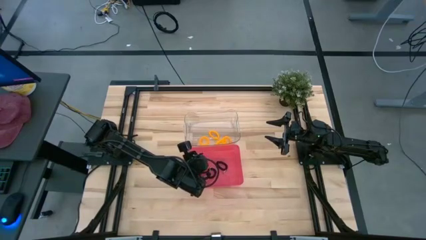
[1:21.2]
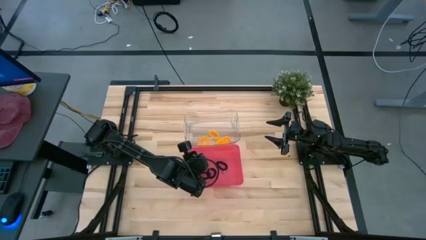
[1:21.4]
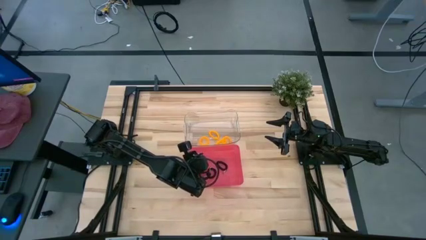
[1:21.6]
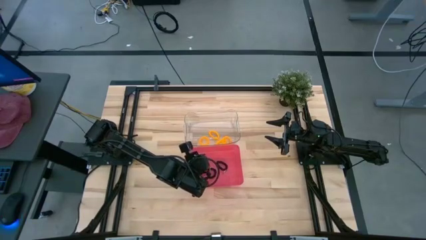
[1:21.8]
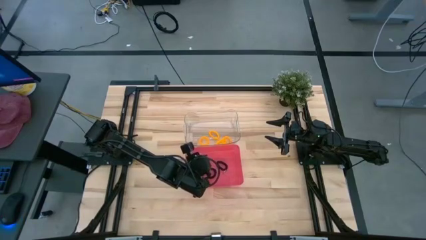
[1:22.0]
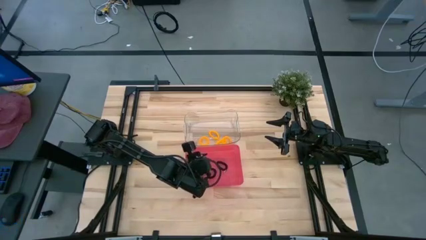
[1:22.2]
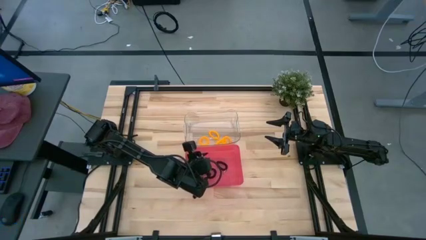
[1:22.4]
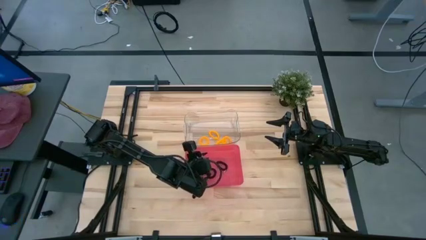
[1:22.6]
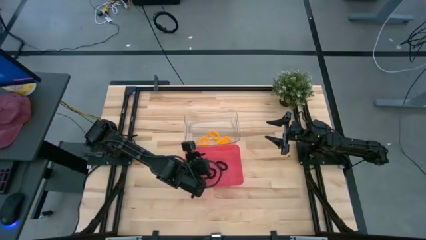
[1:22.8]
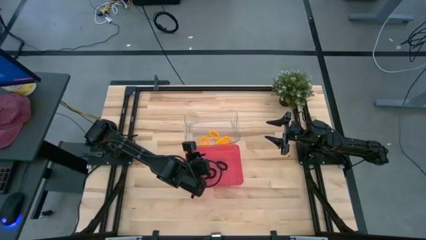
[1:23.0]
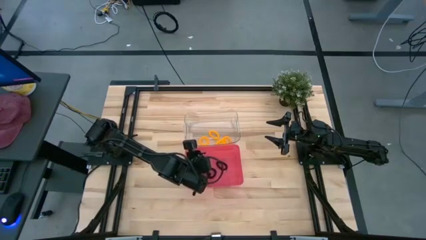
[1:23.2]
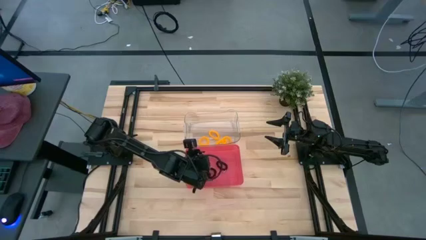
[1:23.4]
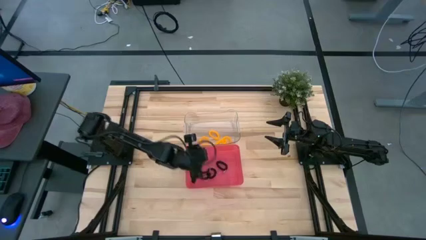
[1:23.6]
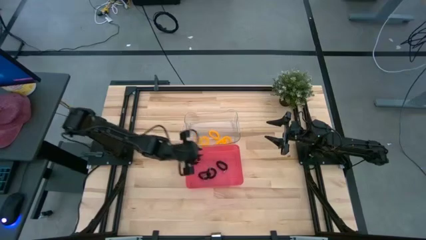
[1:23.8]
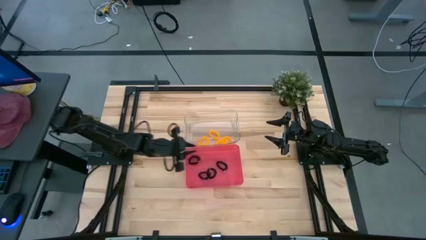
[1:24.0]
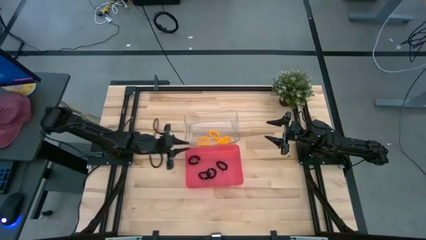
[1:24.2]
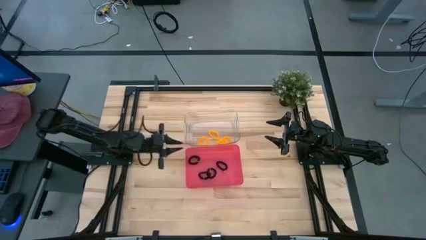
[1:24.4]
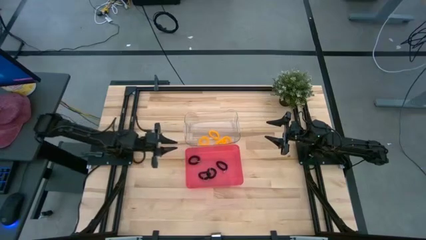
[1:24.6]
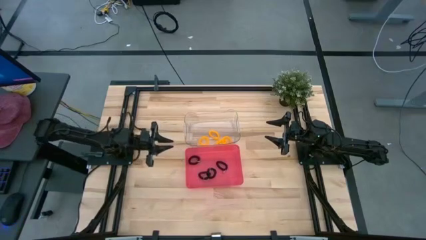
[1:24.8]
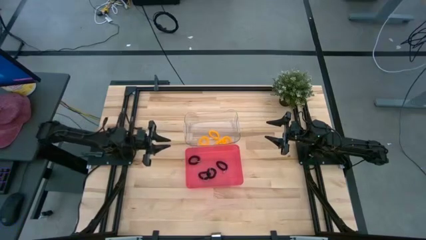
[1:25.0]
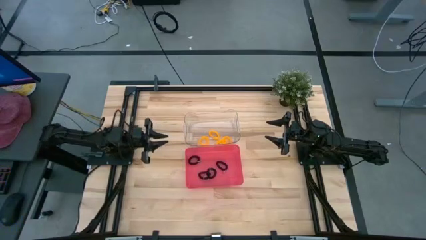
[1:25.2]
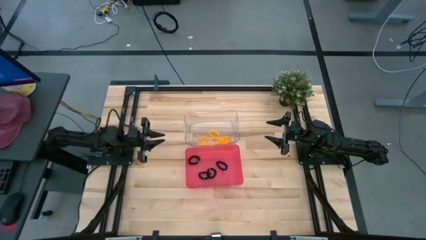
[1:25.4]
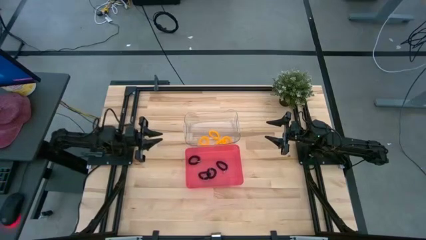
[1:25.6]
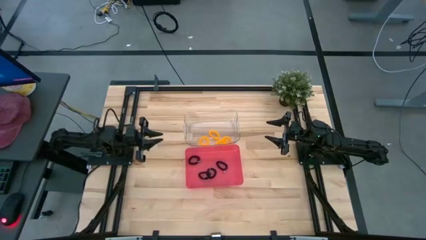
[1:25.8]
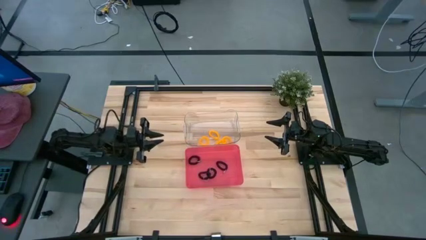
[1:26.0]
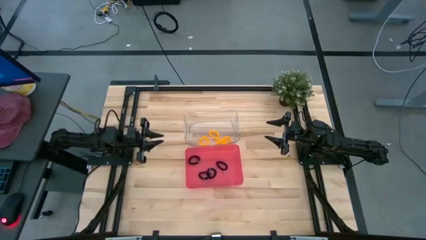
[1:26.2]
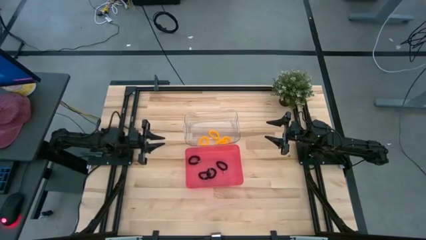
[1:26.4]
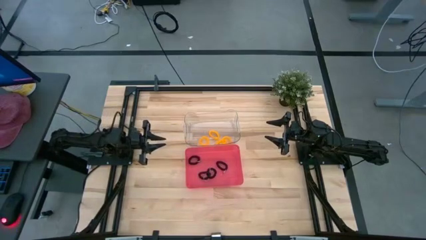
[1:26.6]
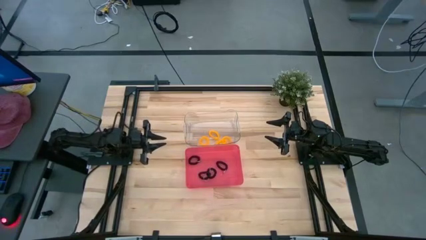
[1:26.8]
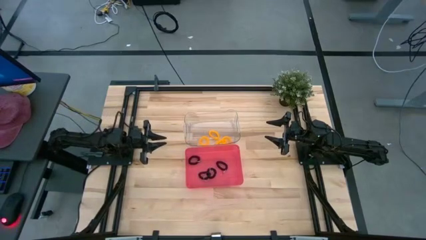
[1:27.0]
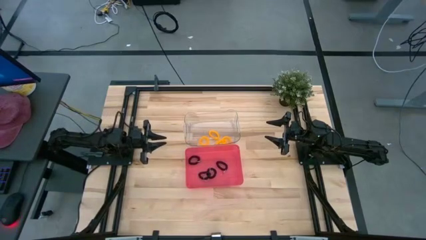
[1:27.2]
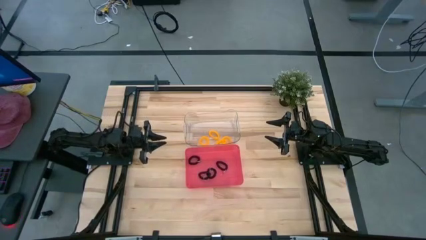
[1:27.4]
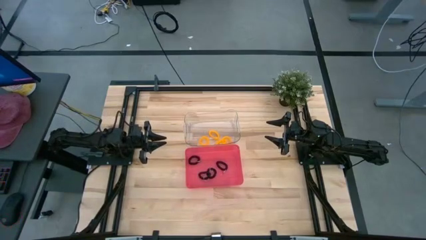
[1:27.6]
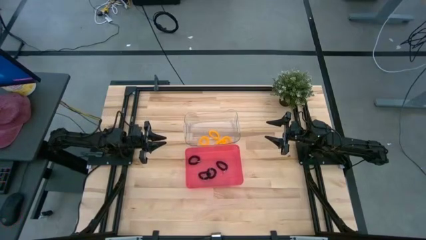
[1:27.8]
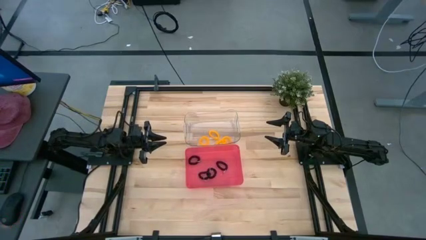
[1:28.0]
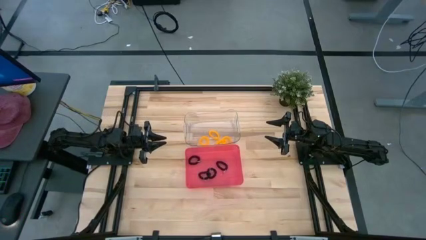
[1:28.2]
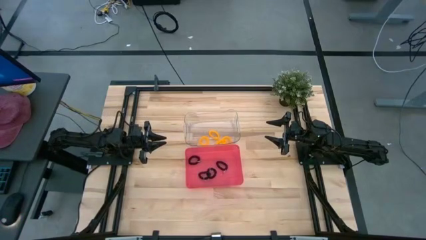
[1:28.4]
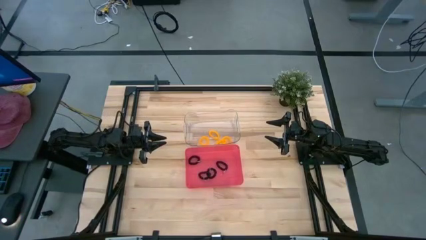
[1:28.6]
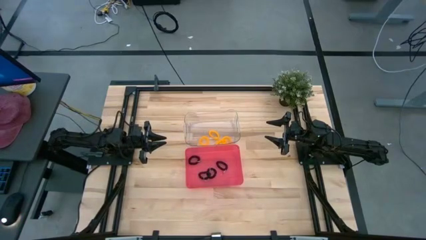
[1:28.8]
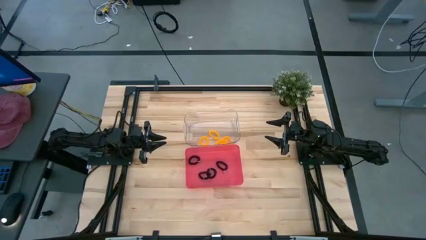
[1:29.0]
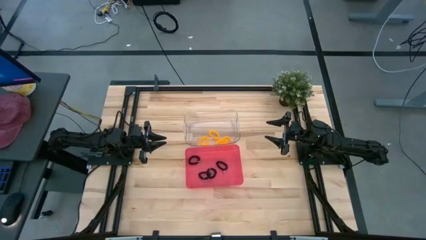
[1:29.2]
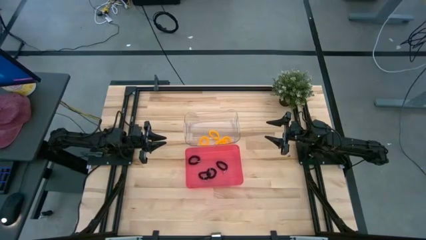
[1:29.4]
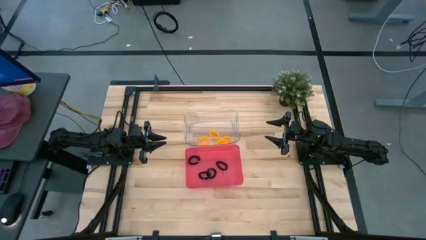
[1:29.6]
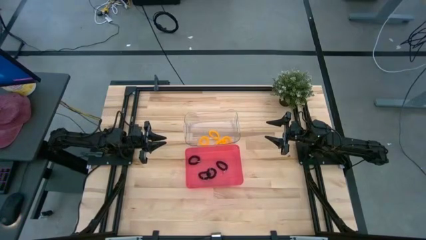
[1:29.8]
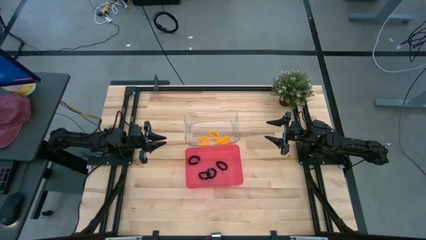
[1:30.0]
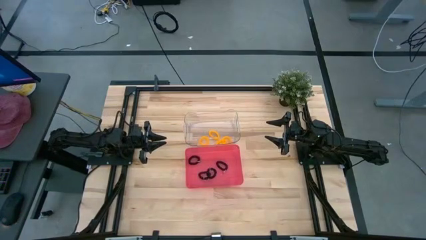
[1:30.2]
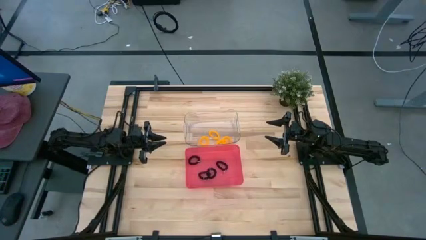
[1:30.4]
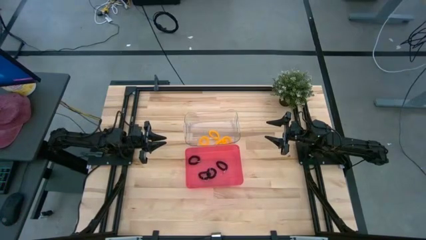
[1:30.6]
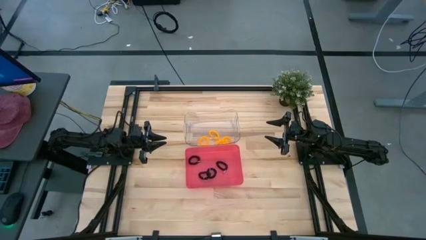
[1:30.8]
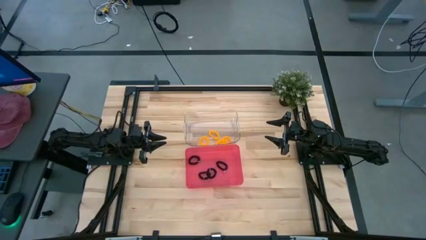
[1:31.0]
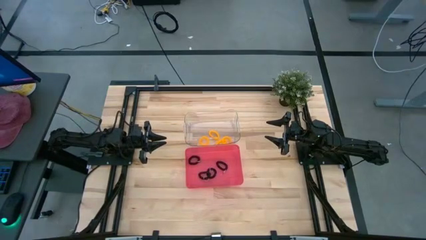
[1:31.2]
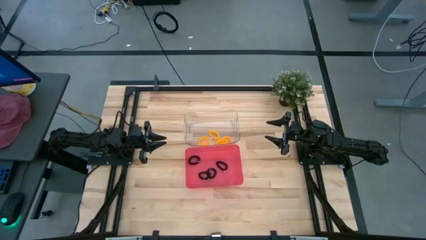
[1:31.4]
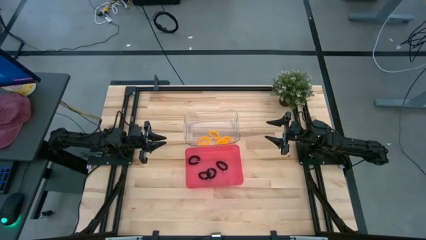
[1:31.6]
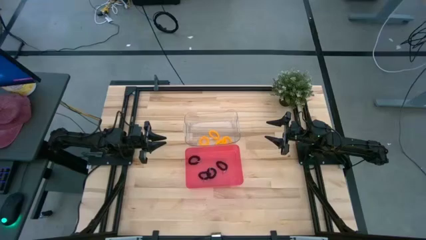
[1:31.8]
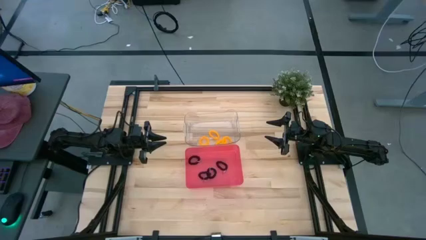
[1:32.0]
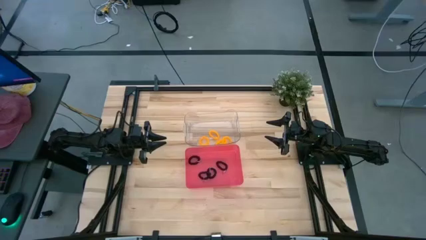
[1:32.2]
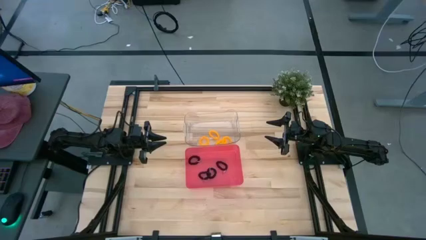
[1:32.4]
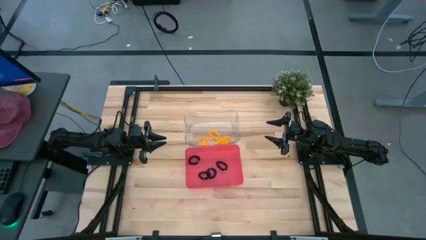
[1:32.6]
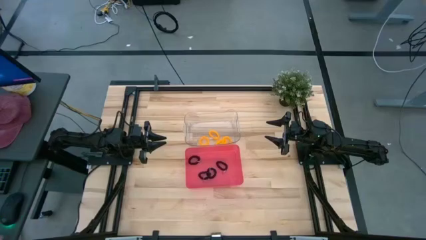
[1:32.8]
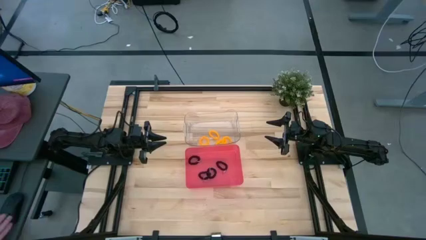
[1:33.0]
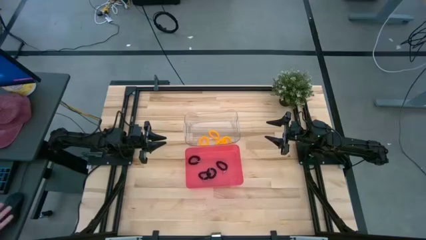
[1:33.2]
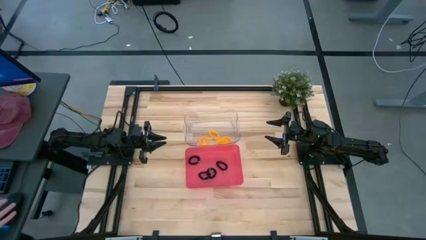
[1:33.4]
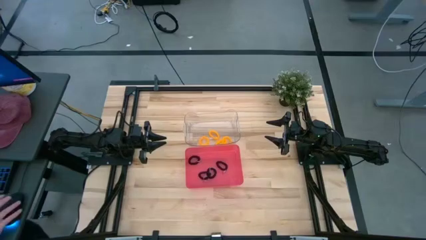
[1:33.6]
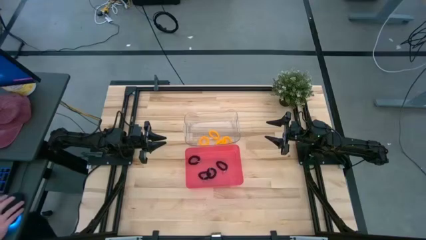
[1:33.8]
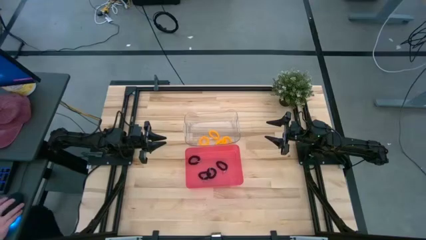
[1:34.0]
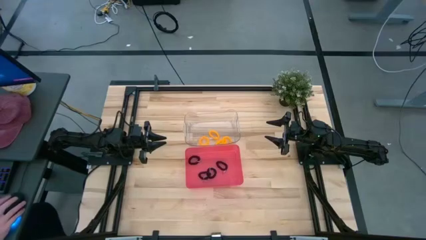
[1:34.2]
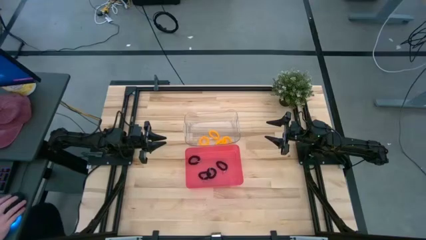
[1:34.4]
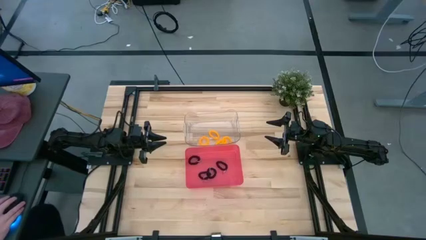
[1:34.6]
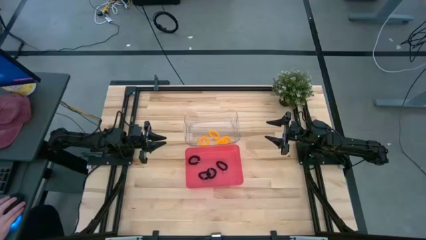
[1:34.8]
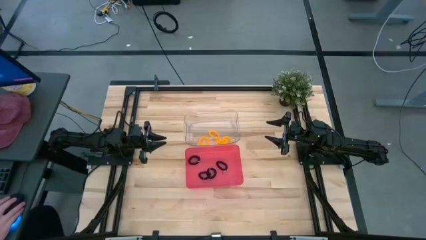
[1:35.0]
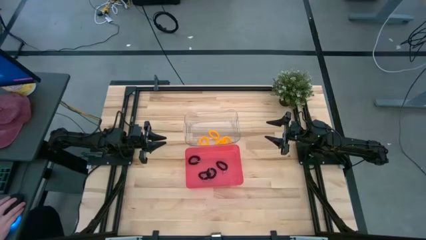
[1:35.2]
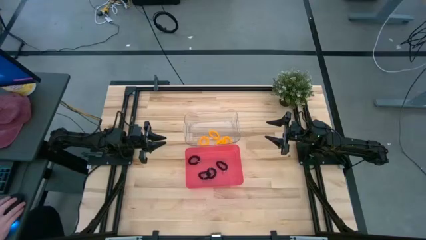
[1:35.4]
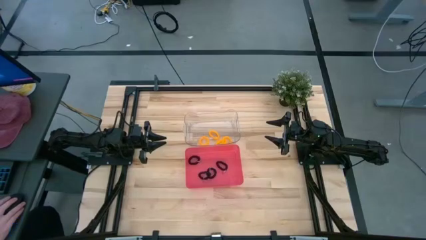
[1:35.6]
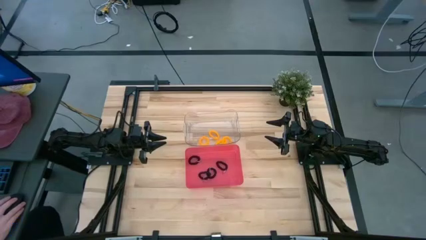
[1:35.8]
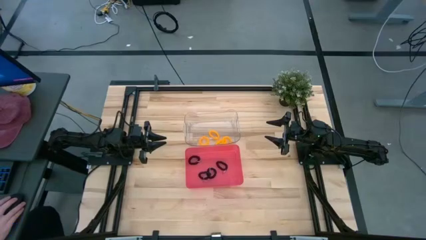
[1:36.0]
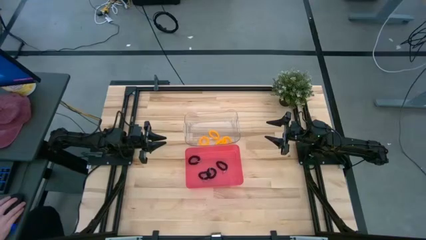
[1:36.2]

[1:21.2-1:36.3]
Task: Sort spring keychains
Return to Home Position
